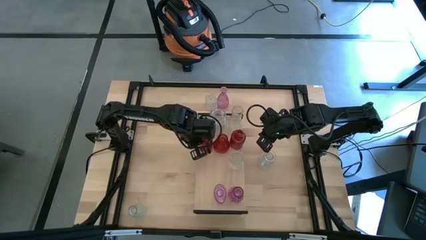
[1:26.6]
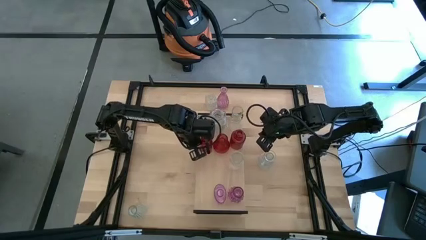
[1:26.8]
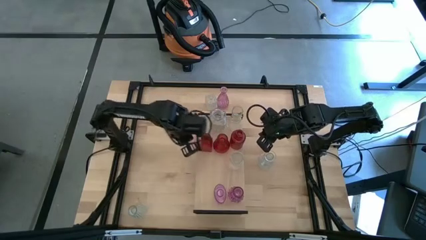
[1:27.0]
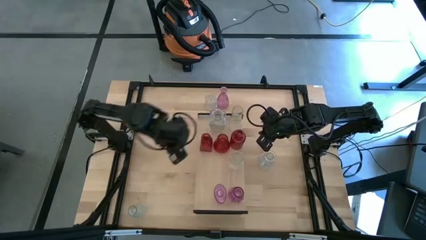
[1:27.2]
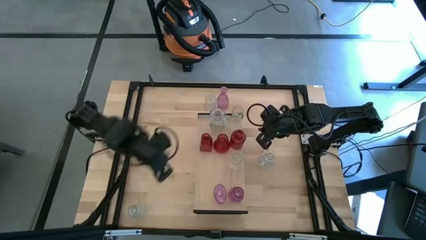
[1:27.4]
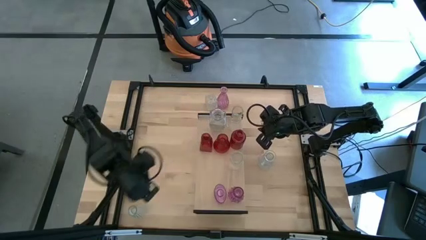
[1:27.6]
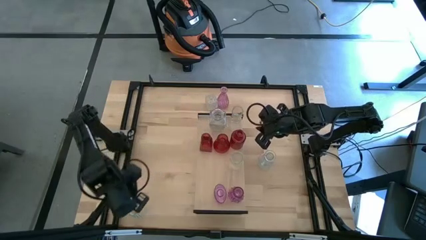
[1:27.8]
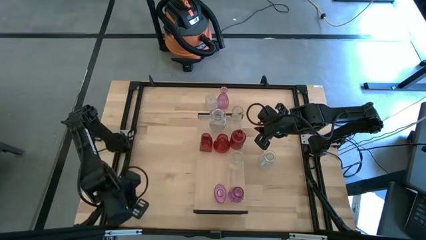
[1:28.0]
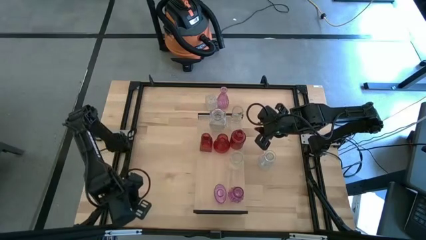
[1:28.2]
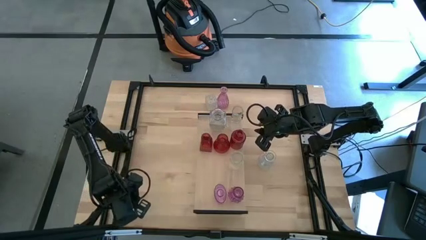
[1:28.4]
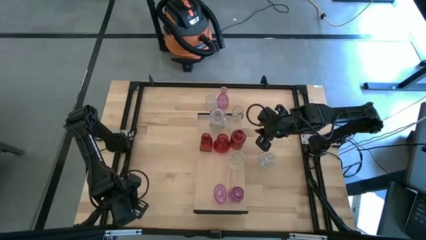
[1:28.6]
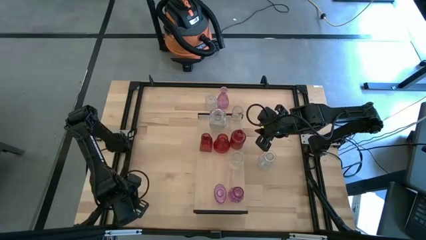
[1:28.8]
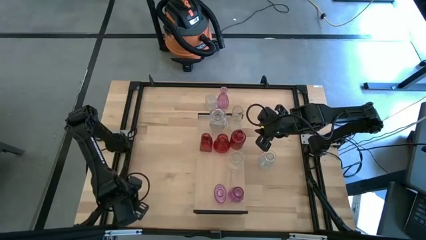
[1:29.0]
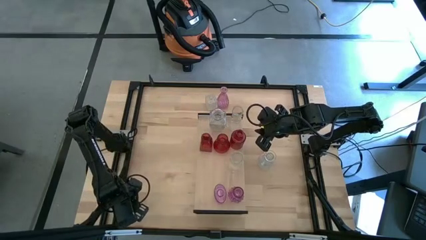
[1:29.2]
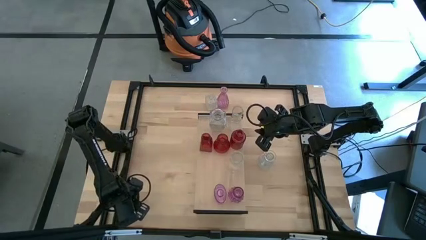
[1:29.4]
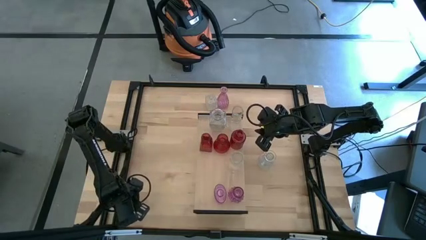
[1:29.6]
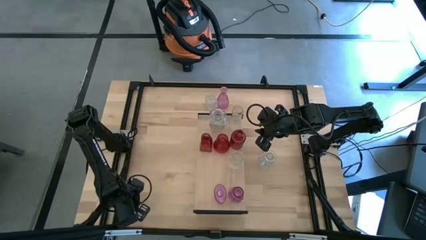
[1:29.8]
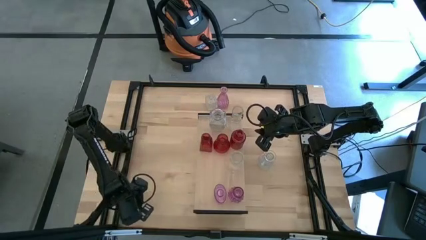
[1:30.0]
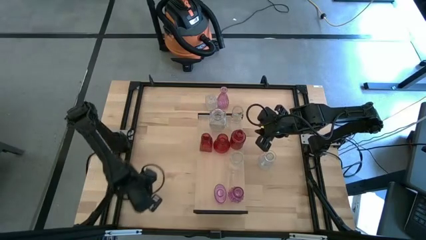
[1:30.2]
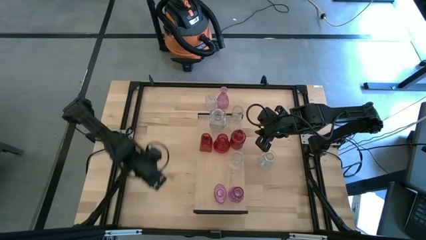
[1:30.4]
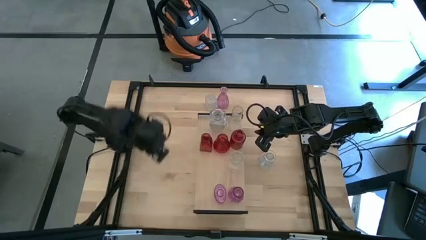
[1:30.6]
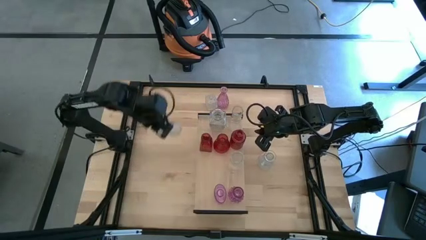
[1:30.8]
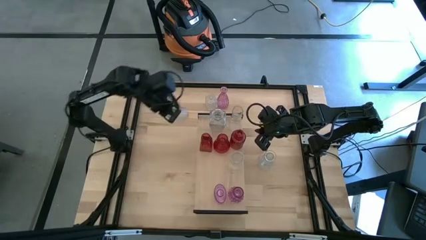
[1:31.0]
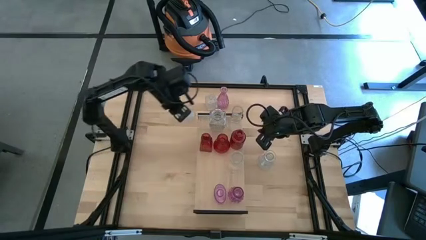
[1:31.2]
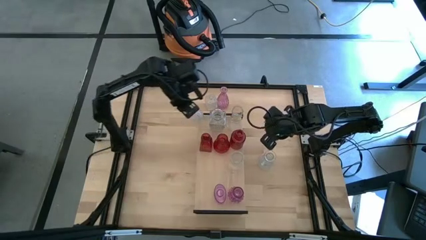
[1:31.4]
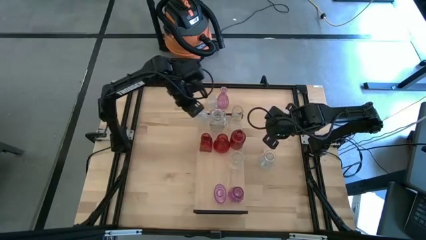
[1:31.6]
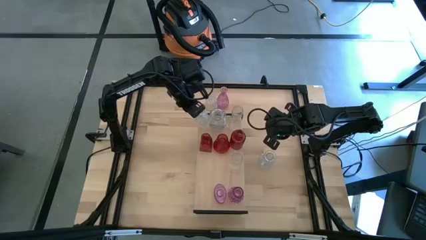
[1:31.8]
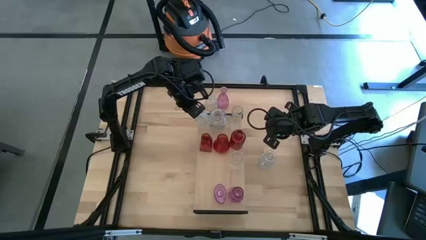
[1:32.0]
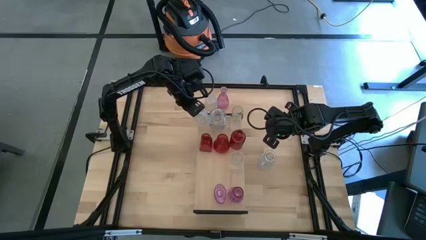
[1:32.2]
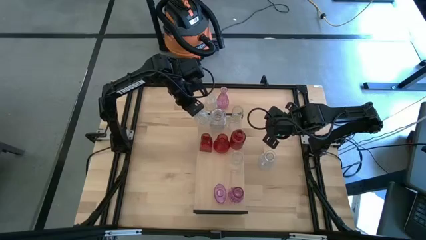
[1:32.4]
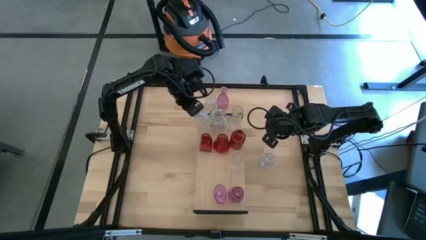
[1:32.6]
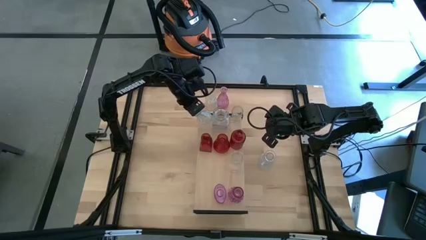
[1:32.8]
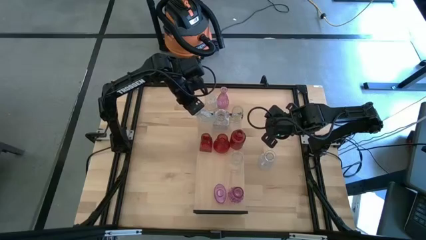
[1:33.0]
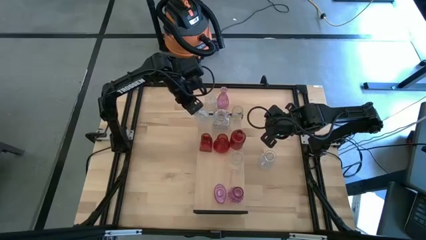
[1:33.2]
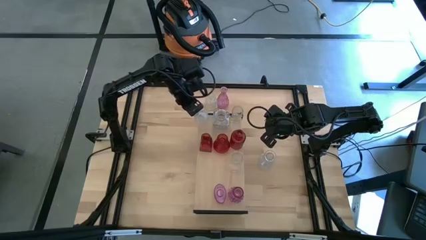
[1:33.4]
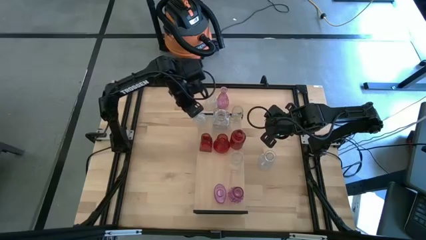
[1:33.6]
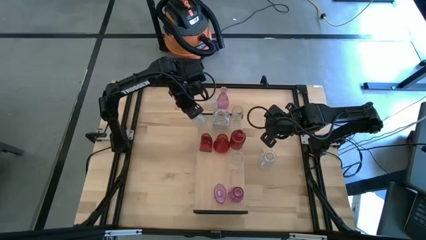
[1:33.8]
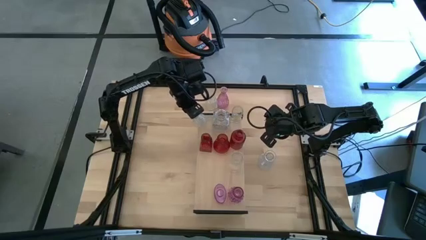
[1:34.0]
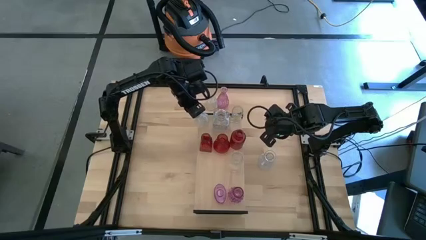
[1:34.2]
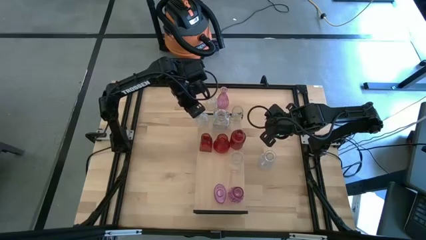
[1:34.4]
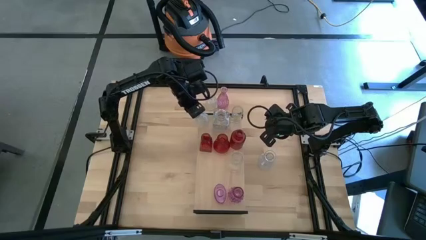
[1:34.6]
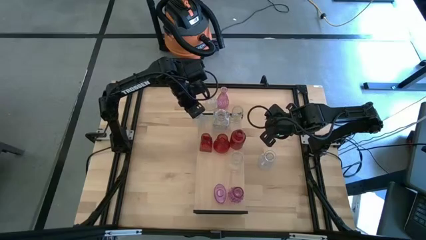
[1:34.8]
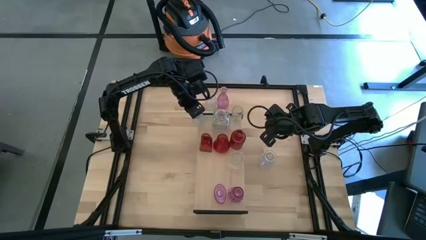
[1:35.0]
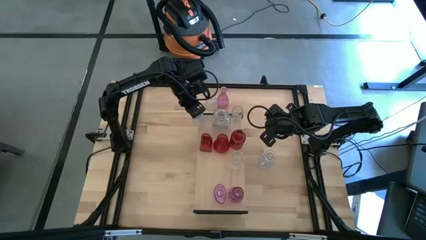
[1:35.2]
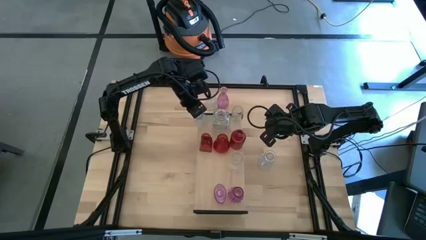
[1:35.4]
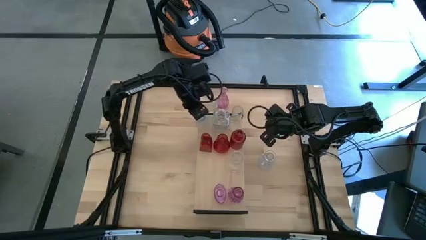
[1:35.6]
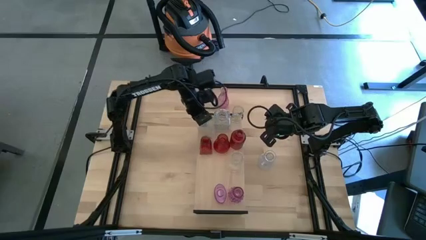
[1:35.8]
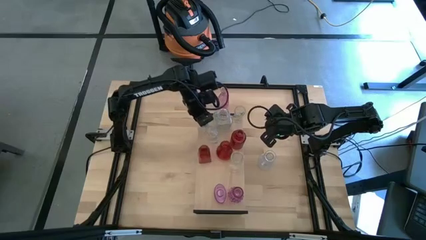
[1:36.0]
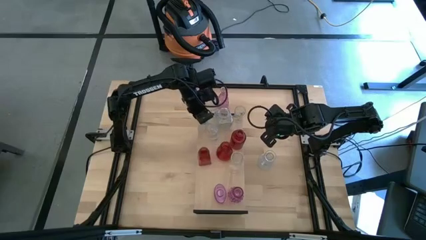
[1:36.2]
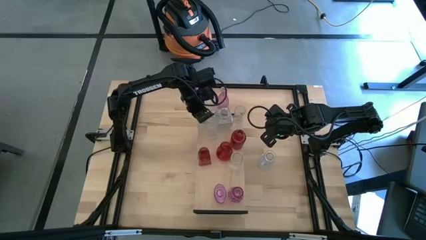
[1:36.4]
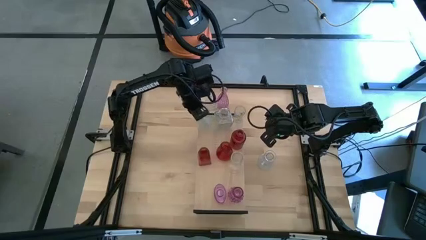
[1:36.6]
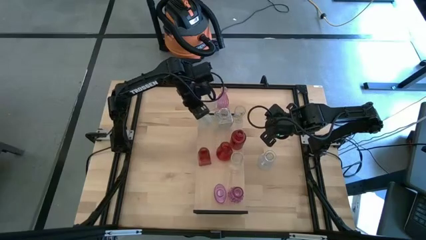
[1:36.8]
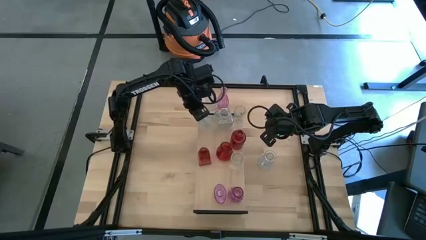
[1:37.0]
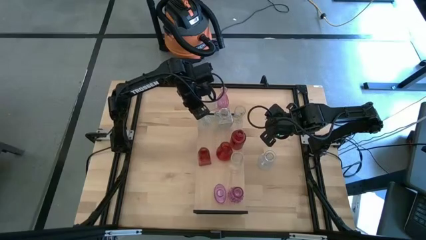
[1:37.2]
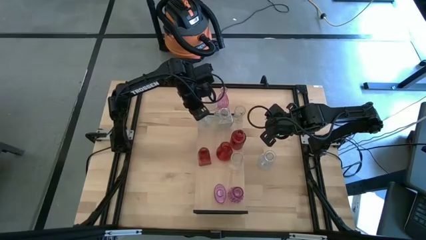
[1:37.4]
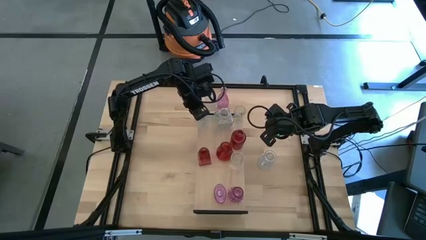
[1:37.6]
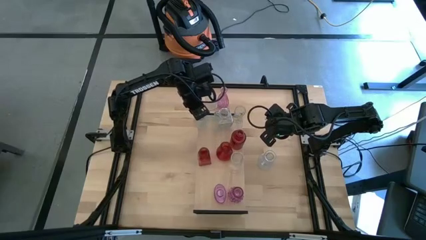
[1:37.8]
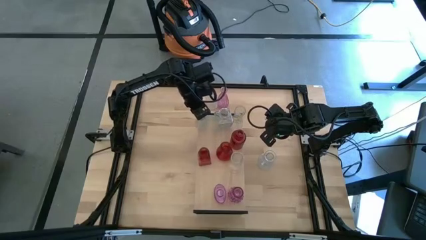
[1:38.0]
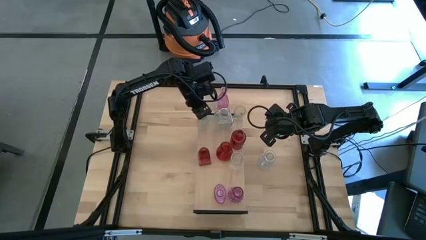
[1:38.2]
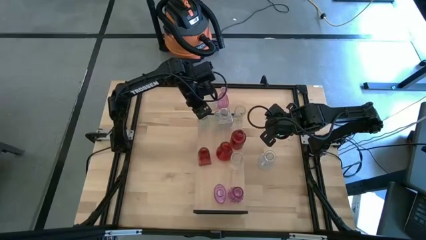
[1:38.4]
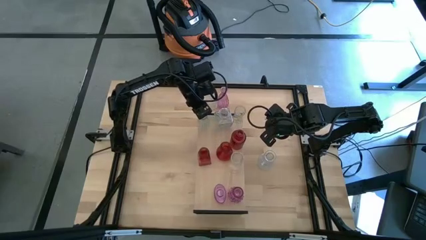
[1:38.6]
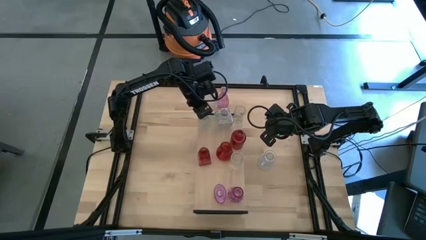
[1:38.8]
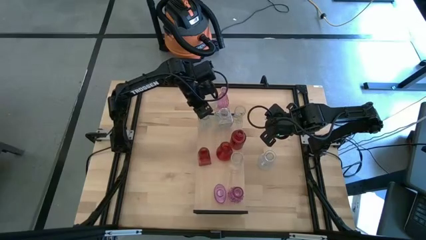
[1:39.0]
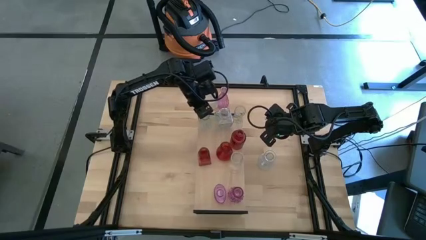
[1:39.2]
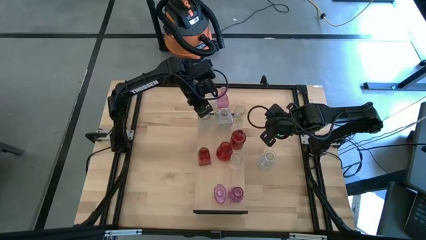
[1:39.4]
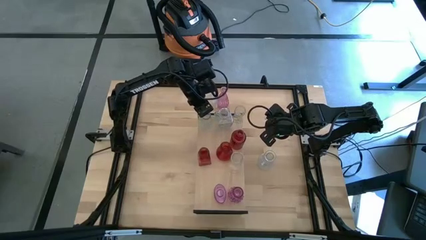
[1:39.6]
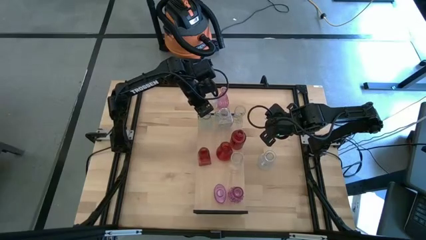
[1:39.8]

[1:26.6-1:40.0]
Task: sort vases onto shelf
Put the transparent vase on the shelf aligned with the transparent vases on the top

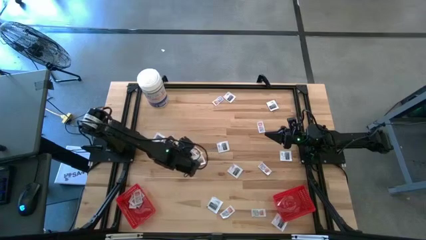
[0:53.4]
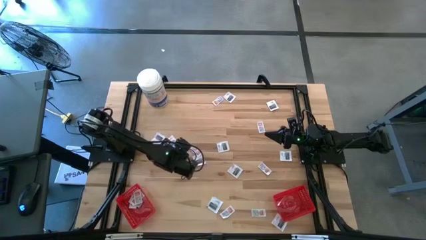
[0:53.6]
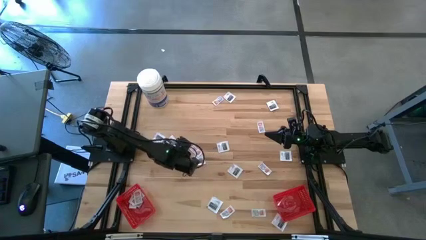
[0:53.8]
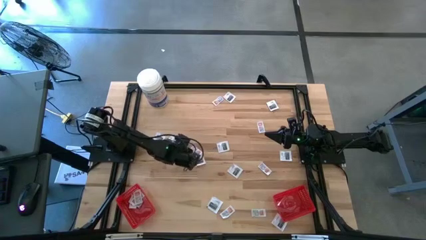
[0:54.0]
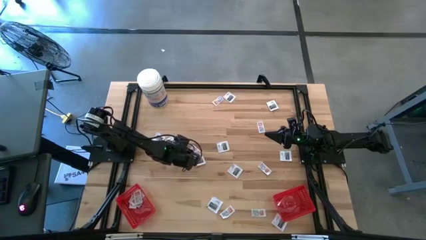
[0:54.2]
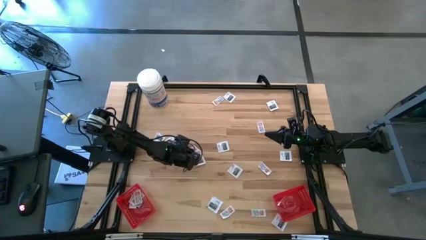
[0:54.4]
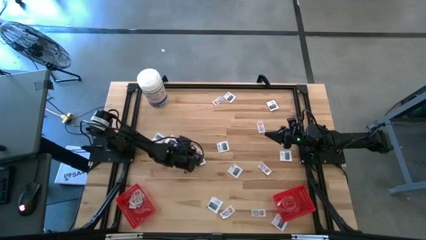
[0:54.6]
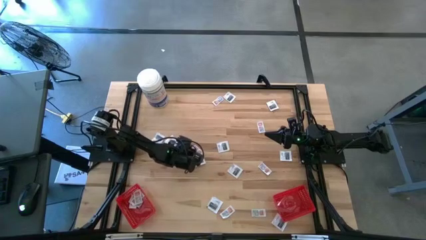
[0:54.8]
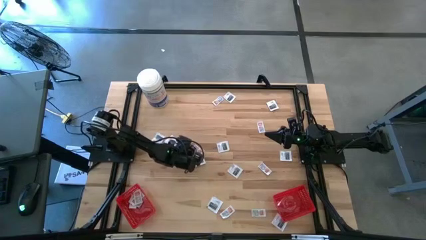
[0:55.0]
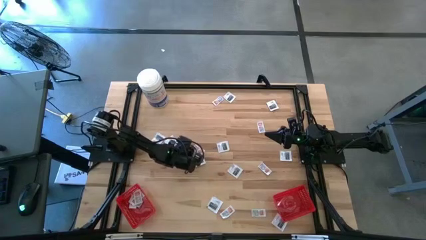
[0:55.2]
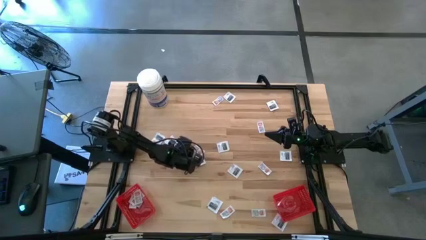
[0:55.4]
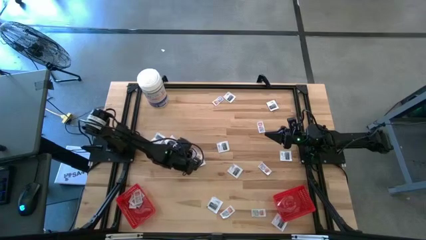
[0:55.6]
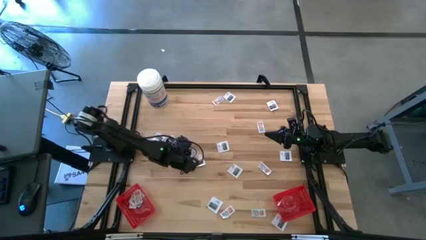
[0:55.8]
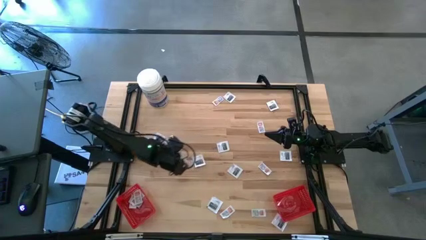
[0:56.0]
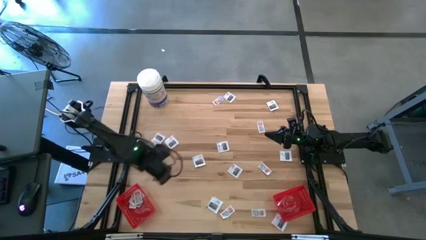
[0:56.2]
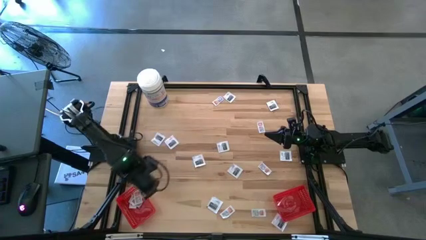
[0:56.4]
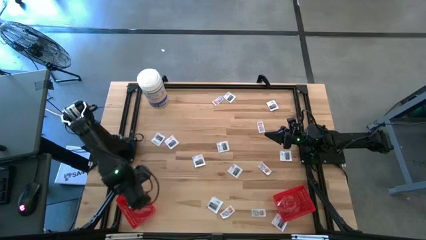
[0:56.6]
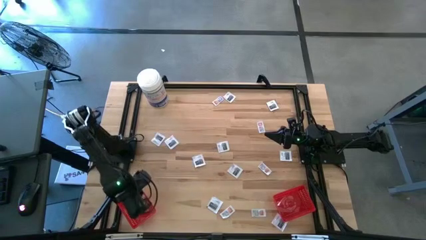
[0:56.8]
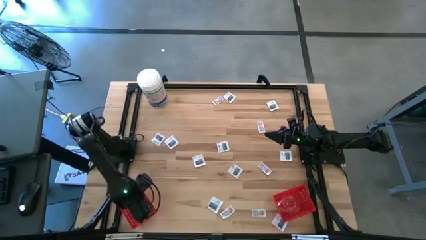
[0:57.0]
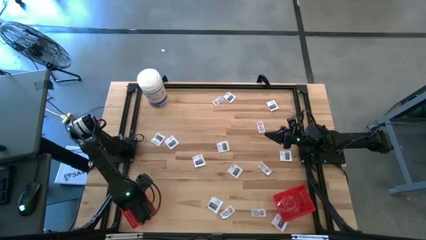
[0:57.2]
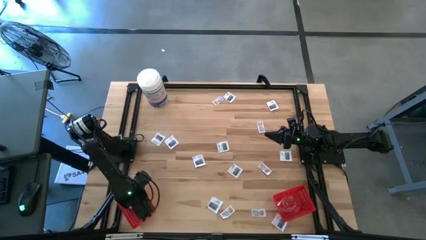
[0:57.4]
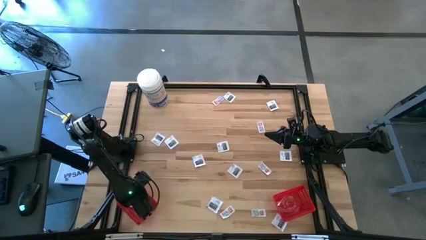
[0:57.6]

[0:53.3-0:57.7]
Task: Pick & Place First Aid Supplies
Put the ointment pack into the left red bin
